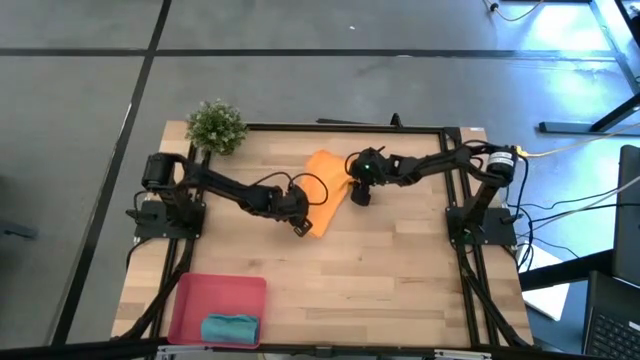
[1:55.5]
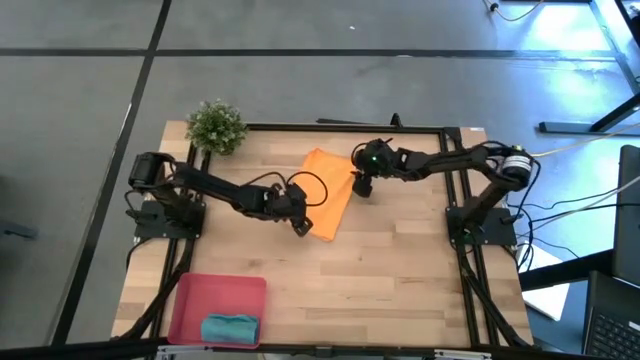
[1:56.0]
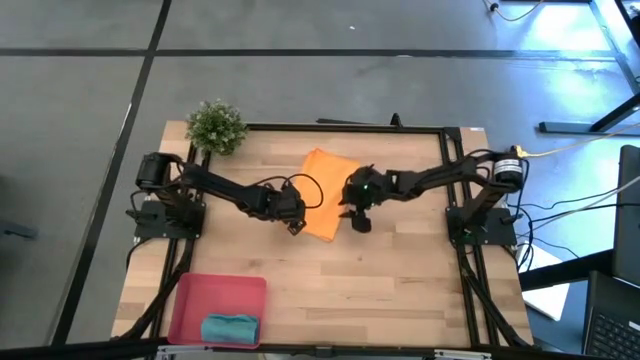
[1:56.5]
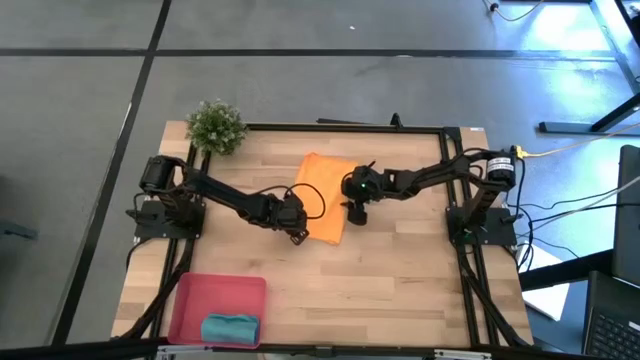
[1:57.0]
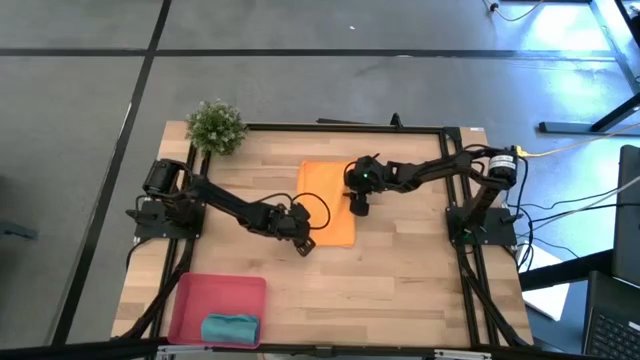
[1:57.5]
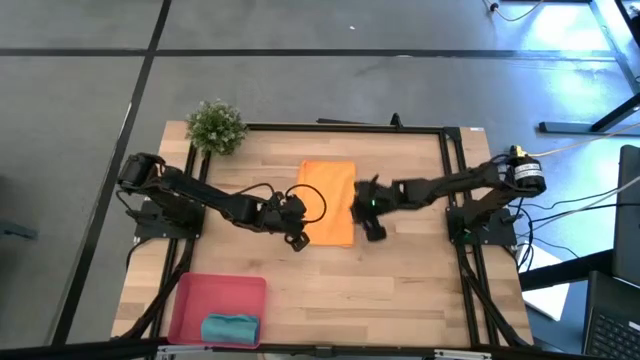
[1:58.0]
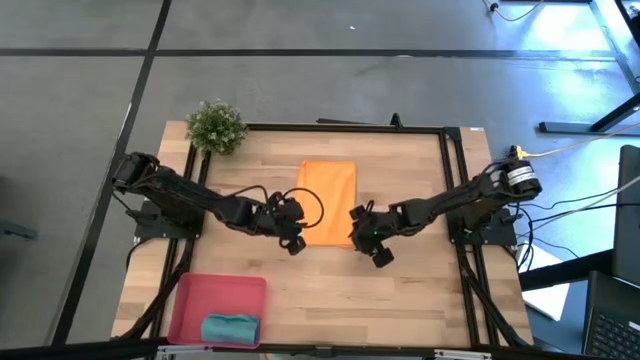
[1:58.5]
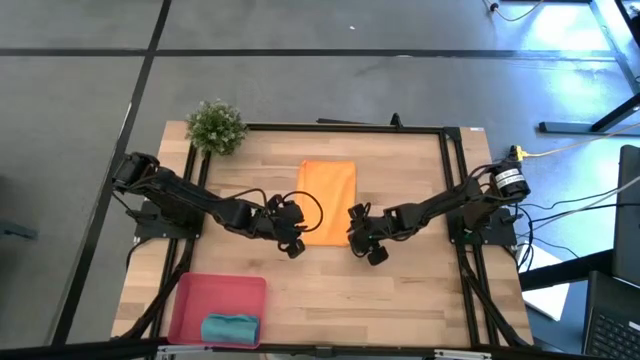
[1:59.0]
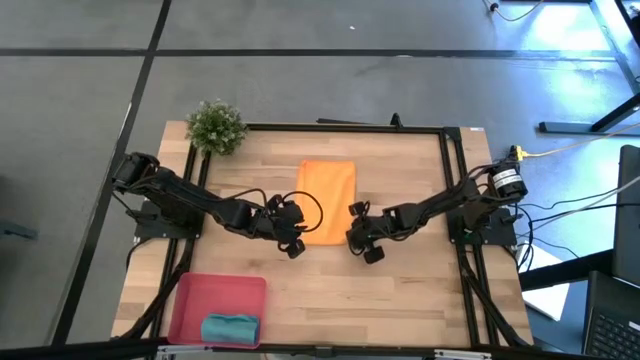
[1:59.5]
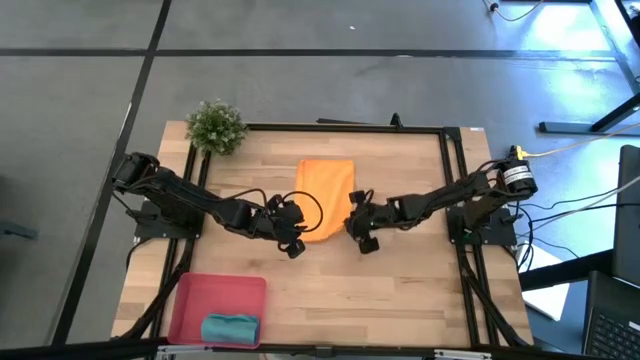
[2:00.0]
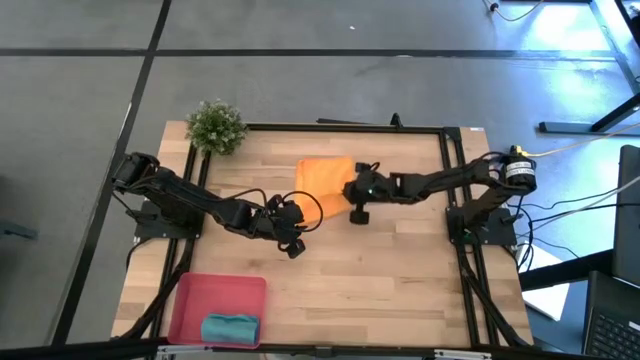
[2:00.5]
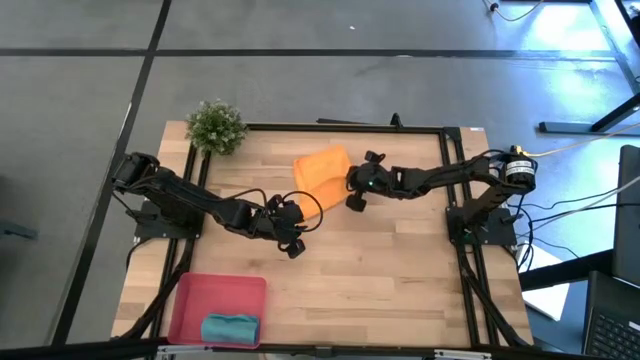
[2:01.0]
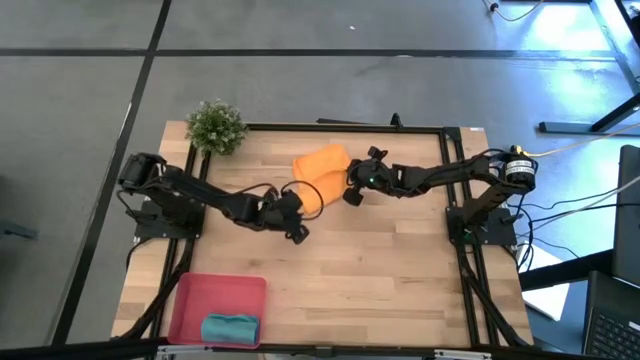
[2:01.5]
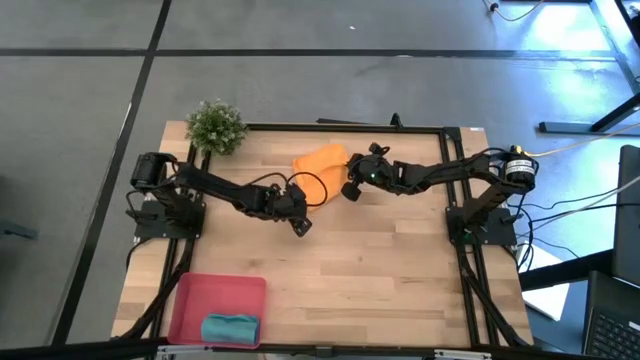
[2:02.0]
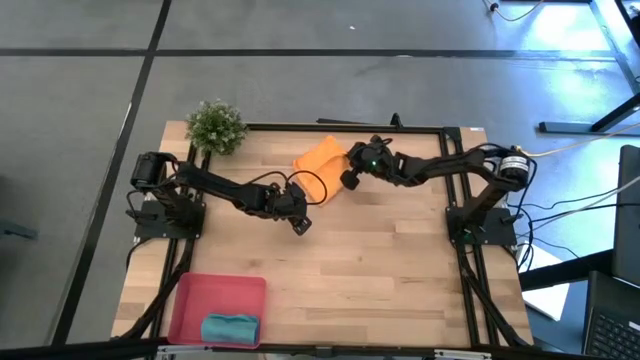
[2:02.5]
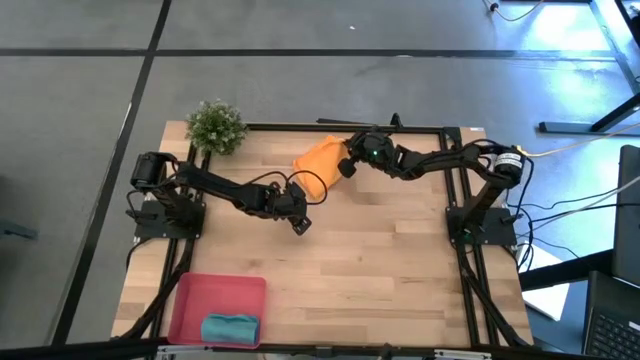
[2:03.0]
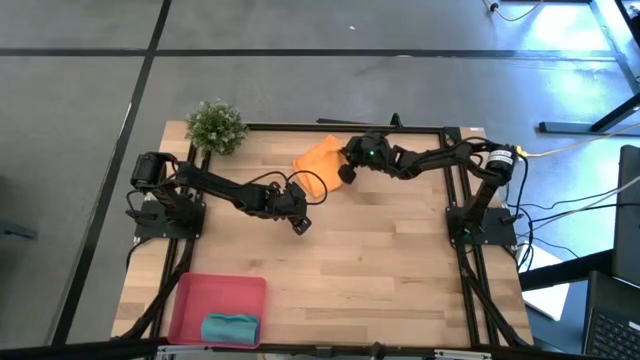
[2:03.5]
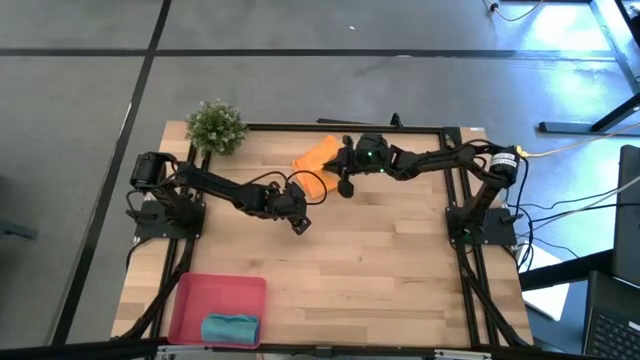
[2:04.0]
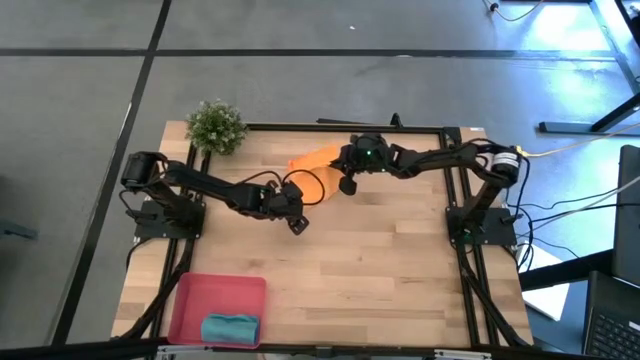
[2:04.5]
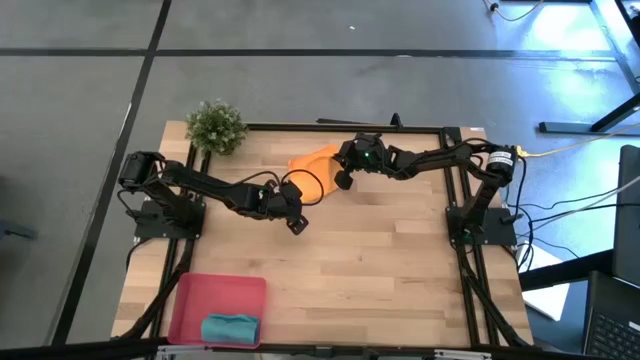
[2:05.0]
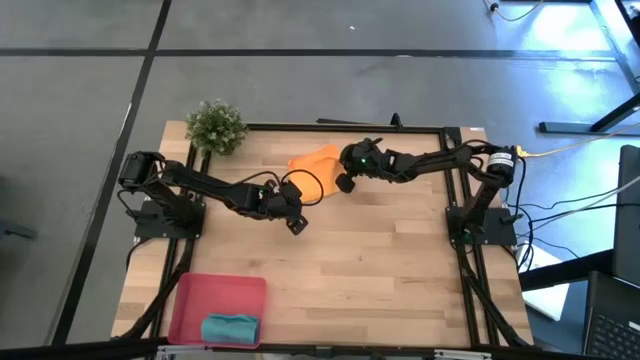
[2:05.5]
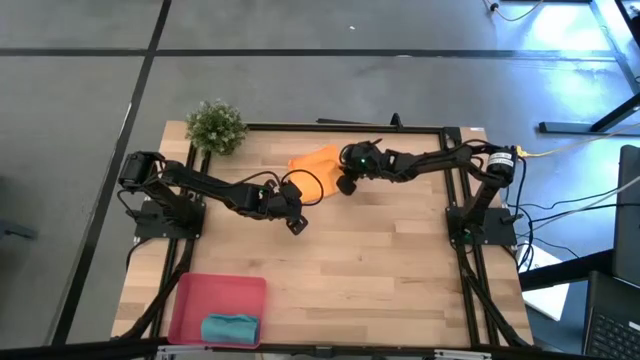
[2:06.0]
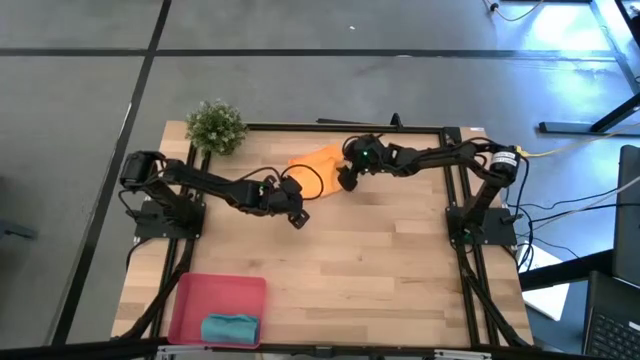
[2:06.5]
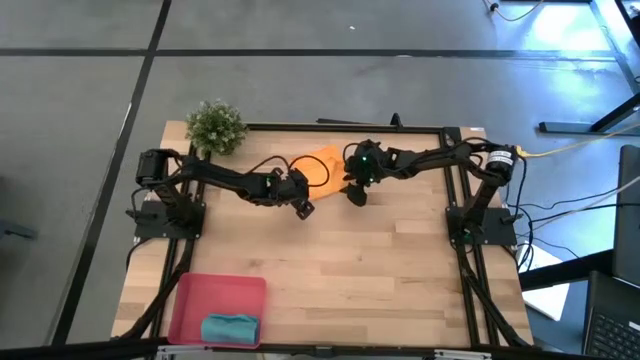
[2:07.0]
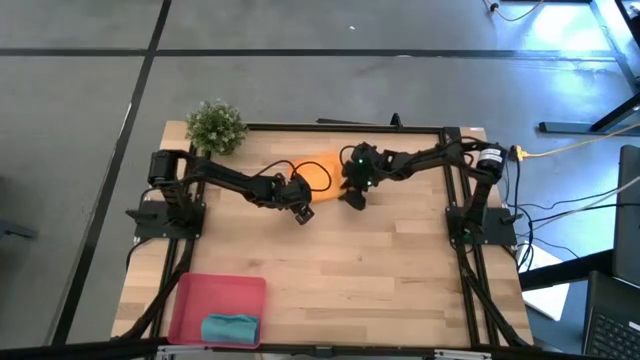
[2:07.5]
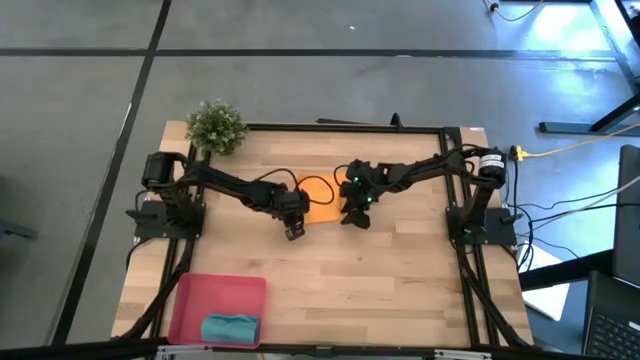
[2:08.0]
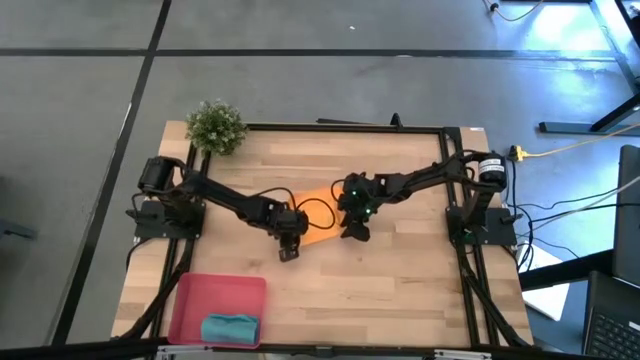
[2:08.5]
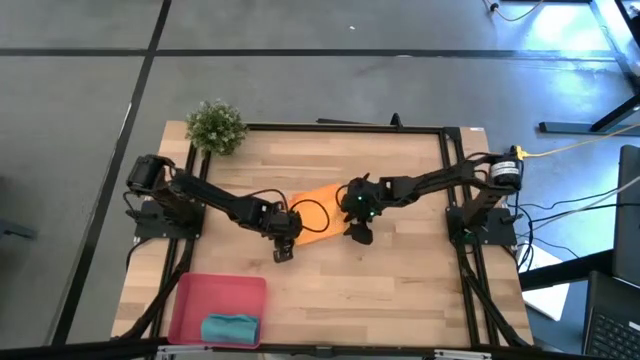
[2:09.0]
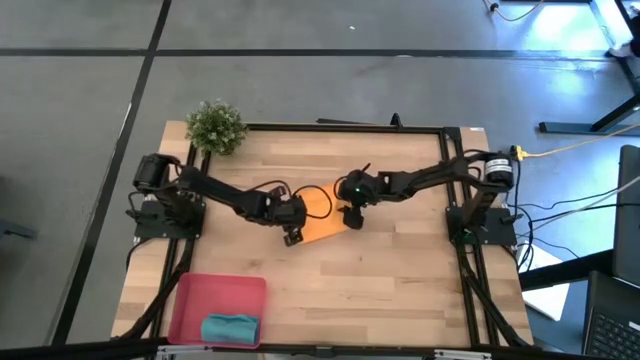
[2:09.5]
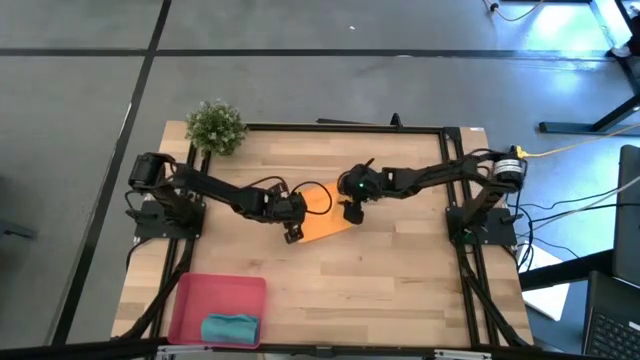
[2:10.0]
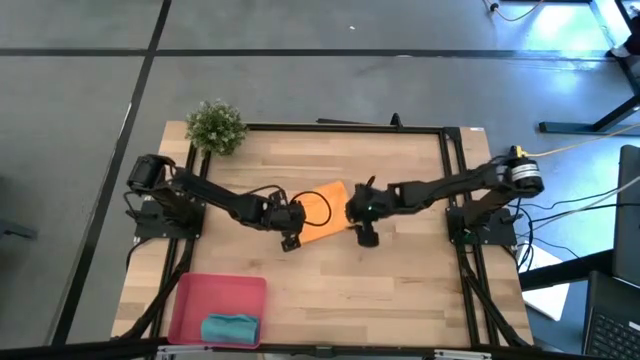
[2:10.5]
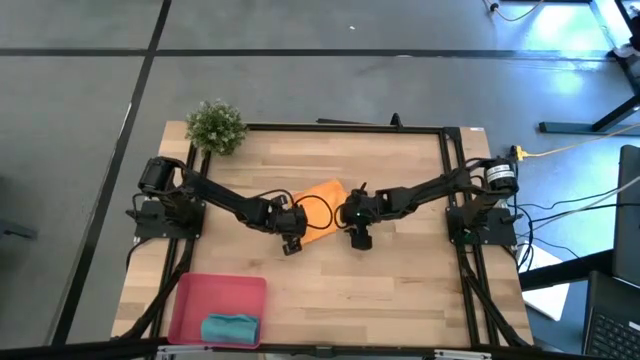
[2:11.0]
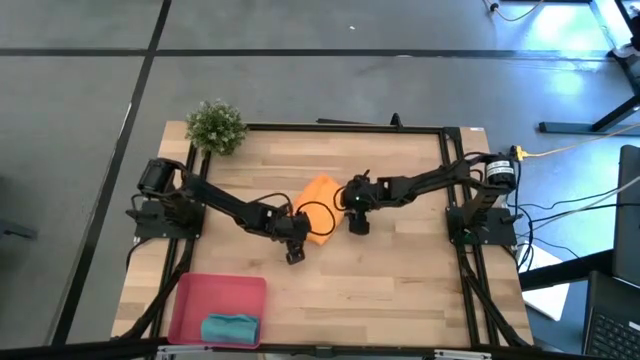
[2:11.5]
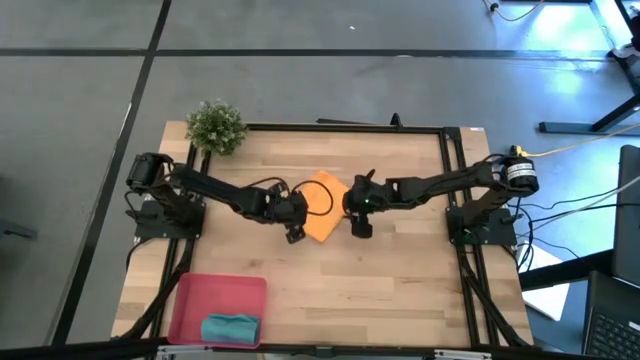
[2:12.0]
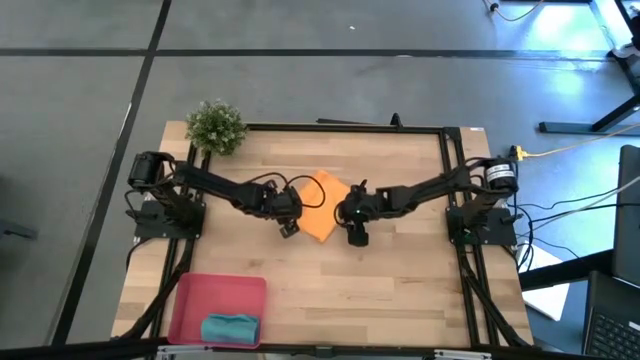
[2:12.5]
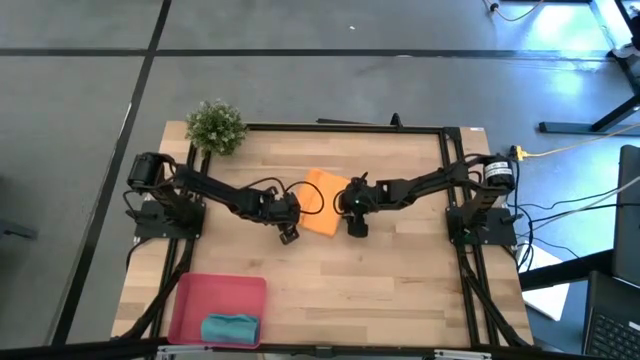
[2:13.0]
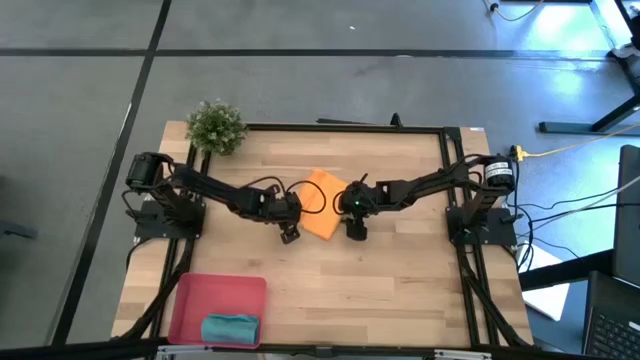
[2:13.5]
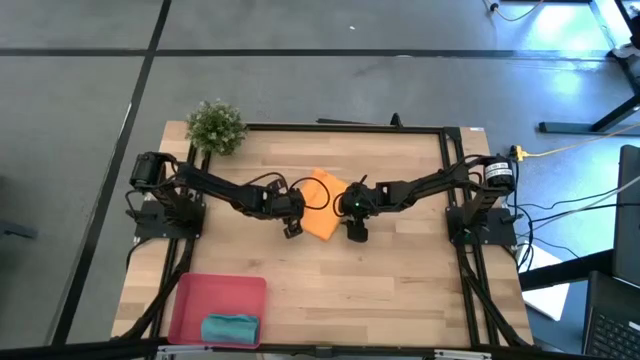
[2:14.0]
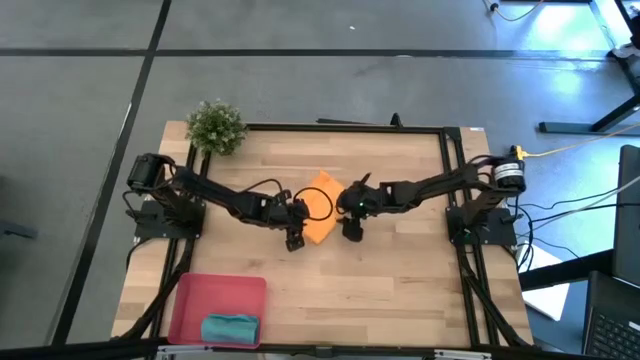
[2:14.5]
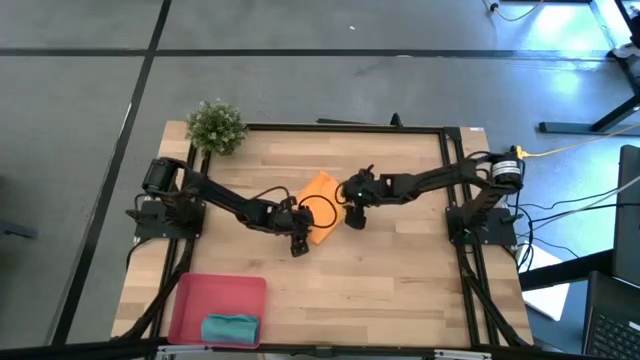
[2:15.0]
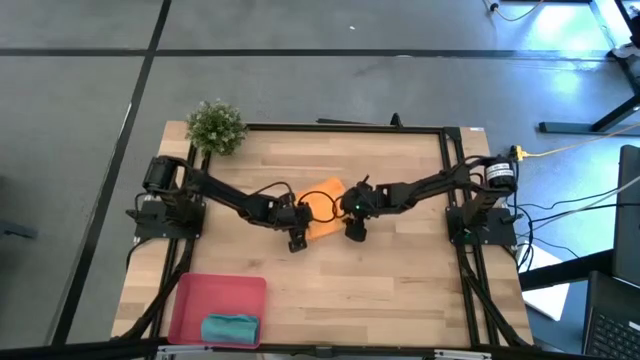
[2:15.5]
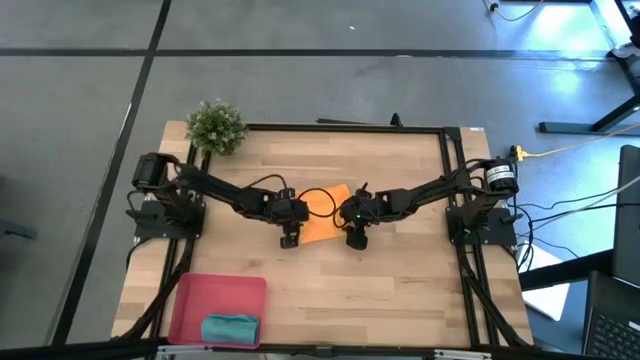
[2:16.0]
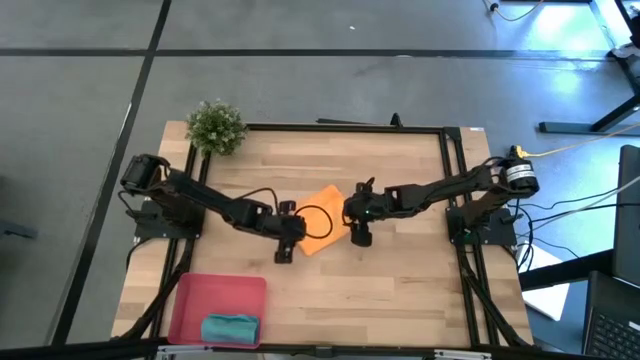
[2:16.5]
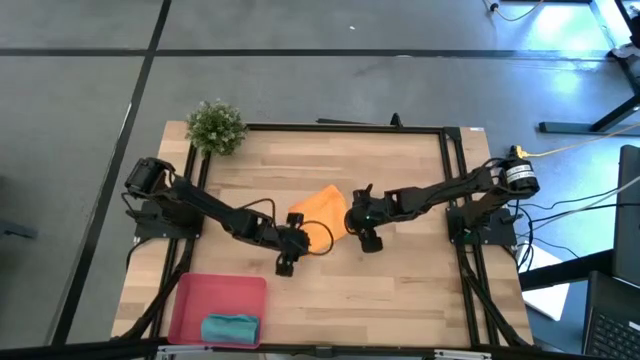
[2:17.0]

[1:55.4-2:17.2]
Task: Roll microfiber towels into tight, uniform cylinder then place into a basket
Fold the orange microfiber towel
